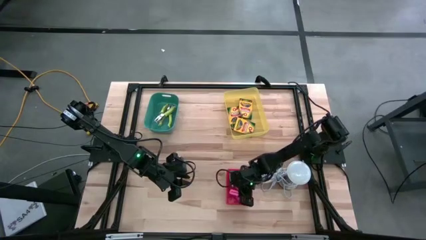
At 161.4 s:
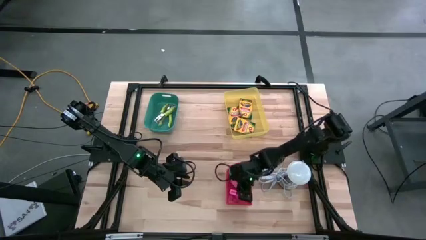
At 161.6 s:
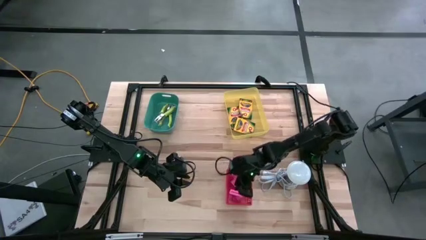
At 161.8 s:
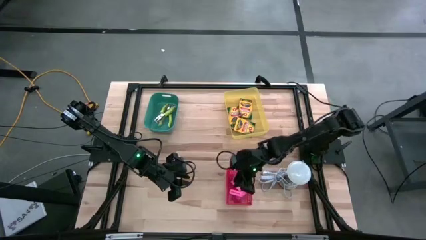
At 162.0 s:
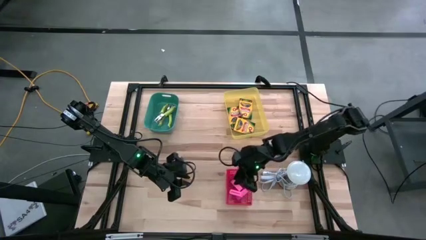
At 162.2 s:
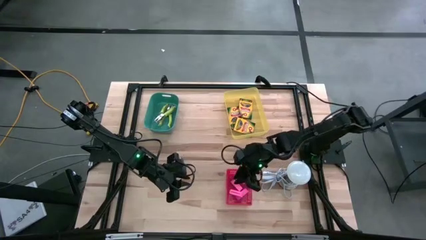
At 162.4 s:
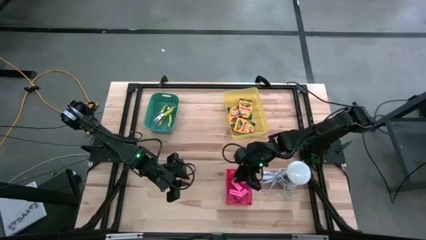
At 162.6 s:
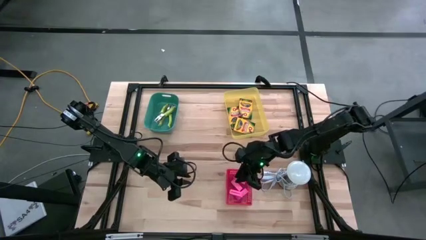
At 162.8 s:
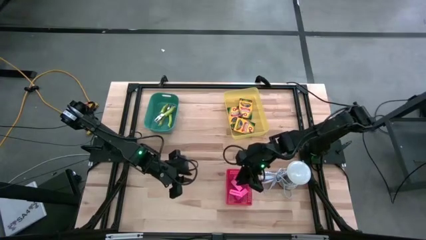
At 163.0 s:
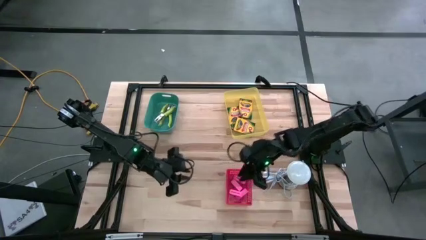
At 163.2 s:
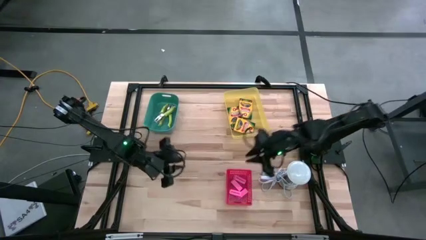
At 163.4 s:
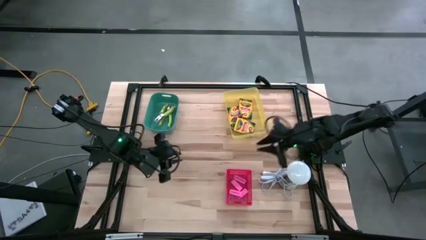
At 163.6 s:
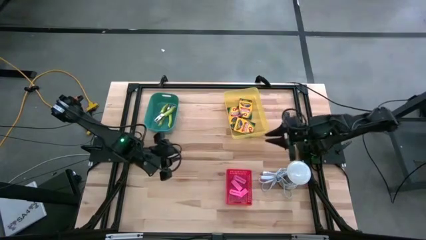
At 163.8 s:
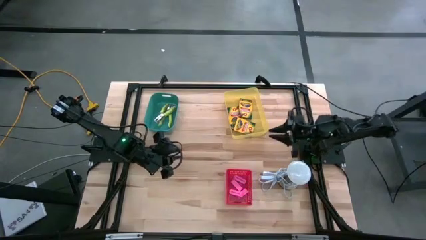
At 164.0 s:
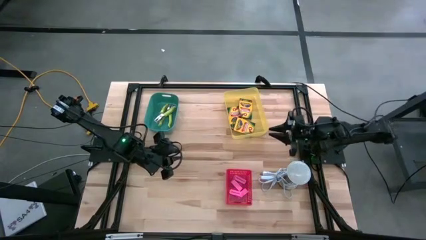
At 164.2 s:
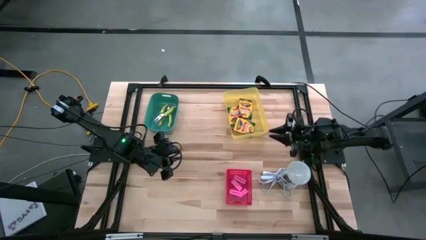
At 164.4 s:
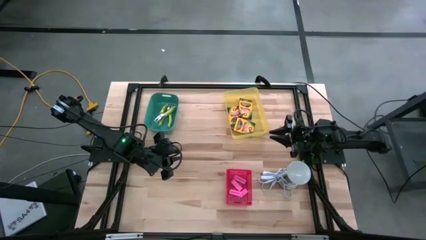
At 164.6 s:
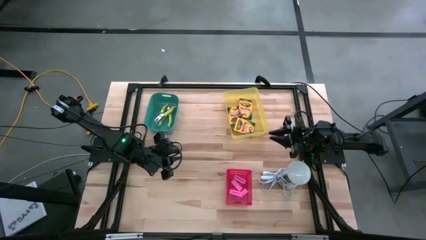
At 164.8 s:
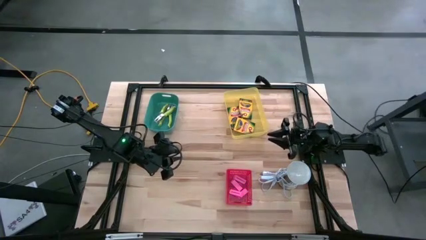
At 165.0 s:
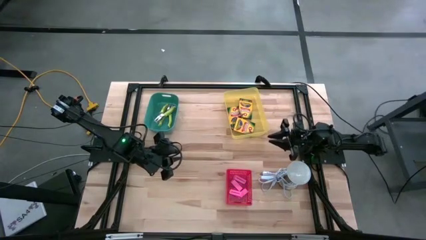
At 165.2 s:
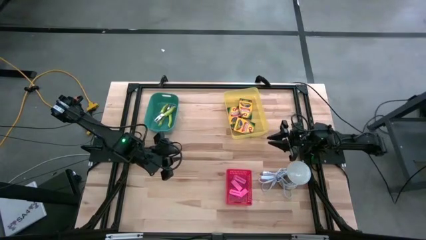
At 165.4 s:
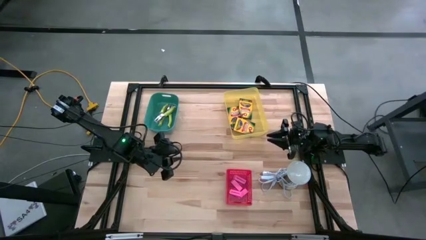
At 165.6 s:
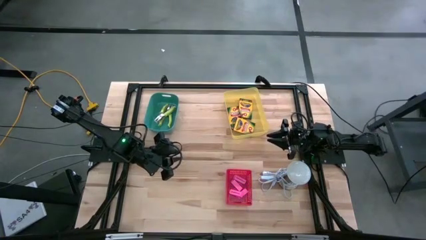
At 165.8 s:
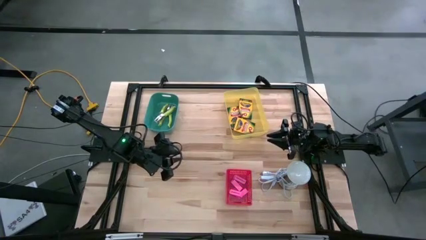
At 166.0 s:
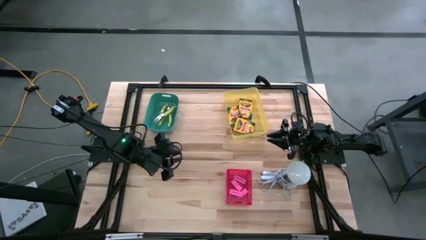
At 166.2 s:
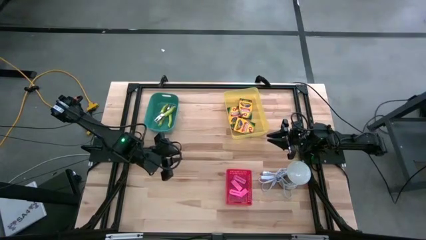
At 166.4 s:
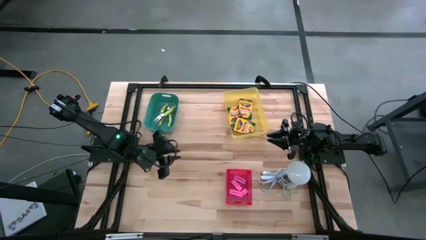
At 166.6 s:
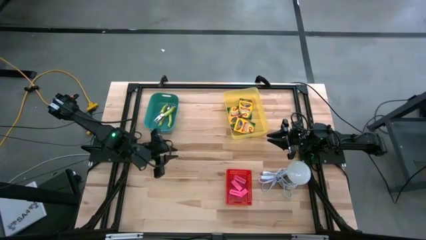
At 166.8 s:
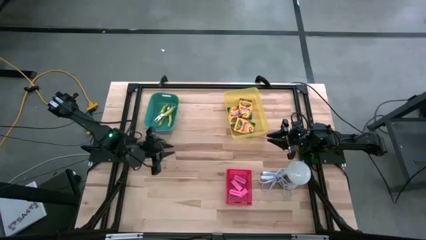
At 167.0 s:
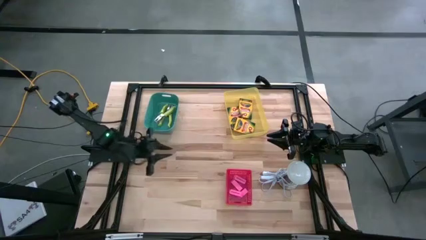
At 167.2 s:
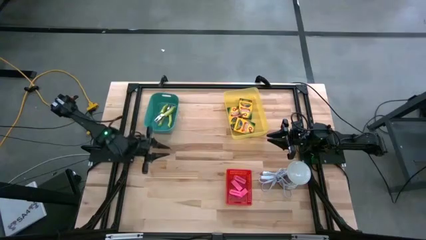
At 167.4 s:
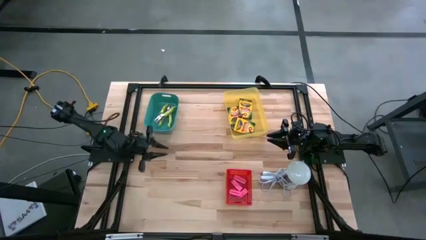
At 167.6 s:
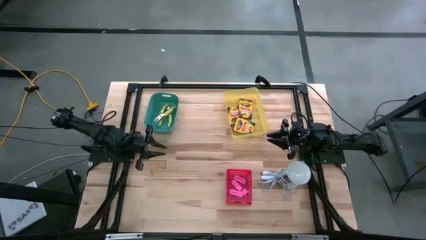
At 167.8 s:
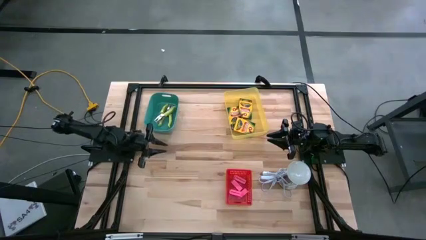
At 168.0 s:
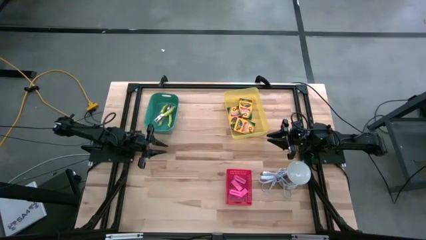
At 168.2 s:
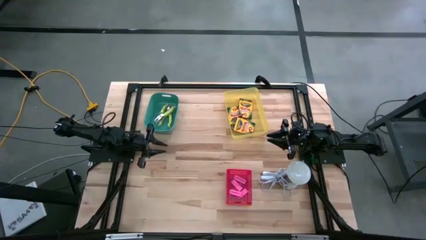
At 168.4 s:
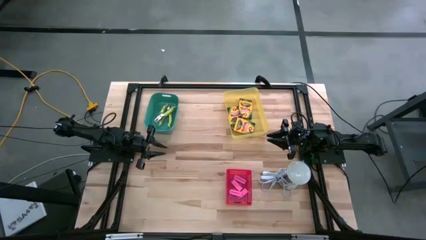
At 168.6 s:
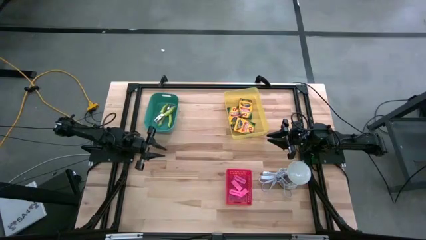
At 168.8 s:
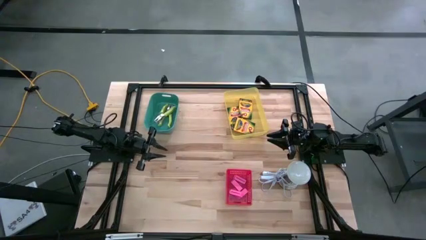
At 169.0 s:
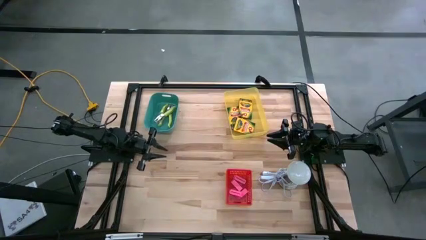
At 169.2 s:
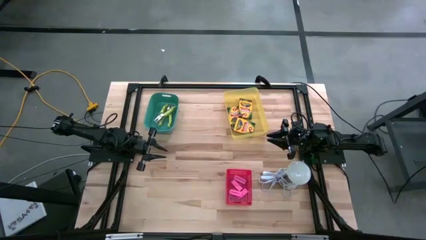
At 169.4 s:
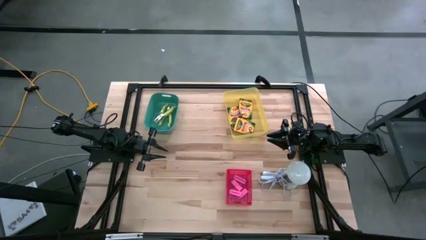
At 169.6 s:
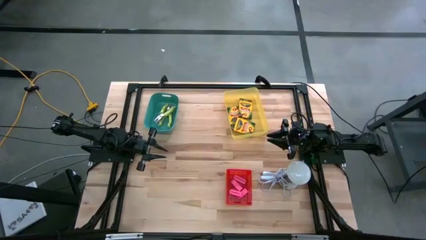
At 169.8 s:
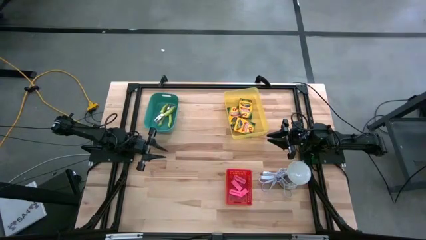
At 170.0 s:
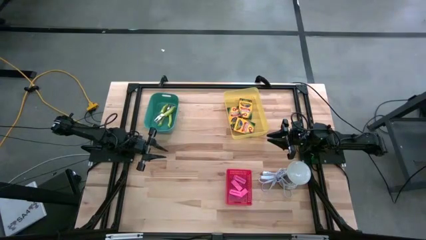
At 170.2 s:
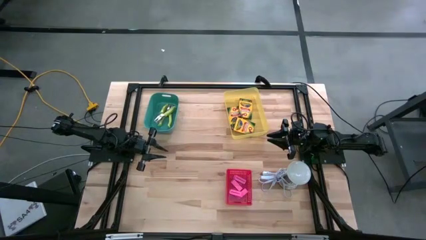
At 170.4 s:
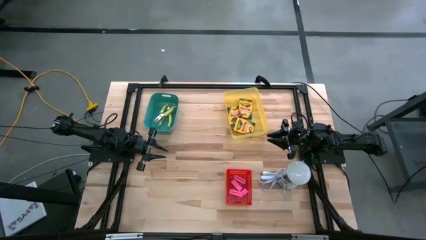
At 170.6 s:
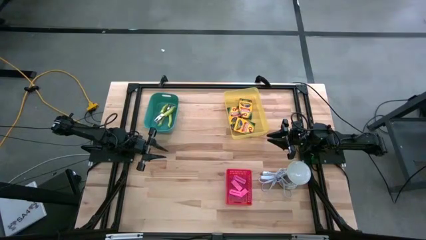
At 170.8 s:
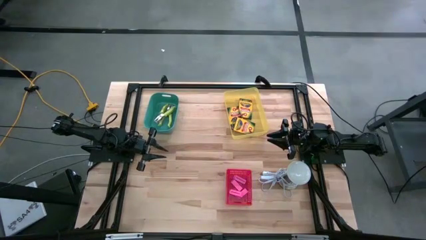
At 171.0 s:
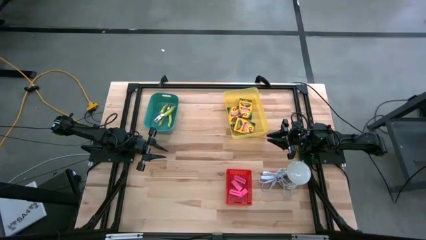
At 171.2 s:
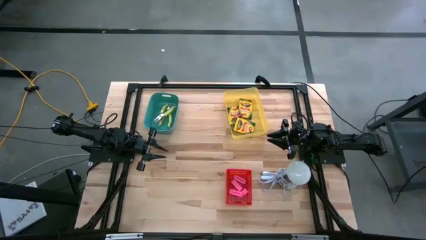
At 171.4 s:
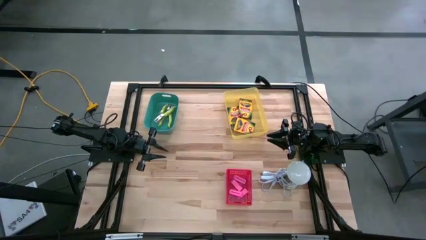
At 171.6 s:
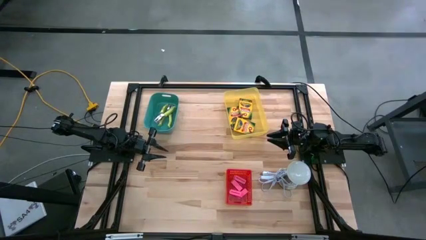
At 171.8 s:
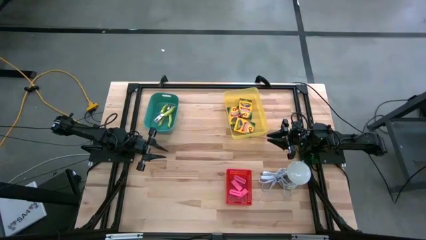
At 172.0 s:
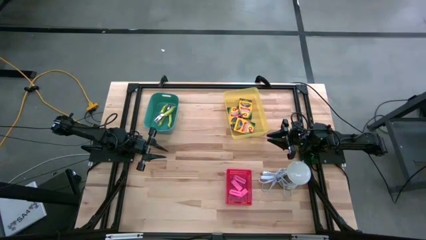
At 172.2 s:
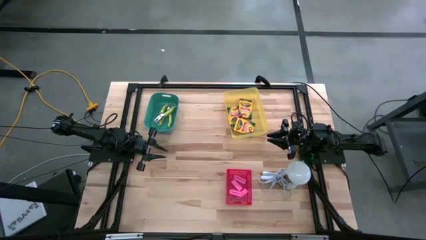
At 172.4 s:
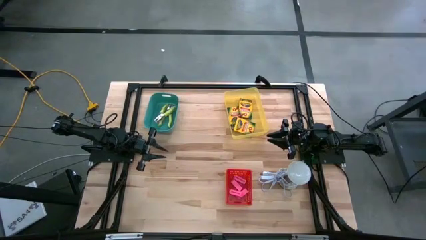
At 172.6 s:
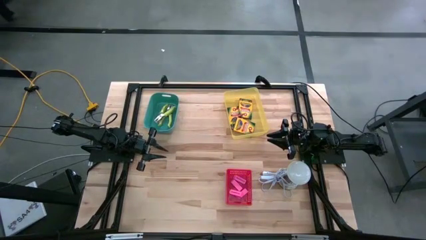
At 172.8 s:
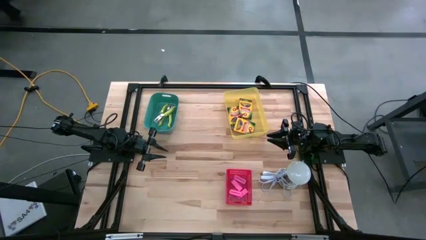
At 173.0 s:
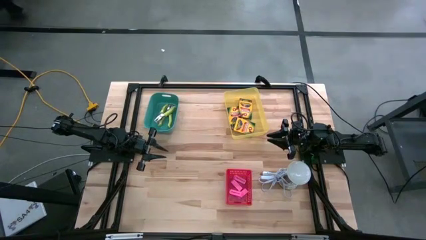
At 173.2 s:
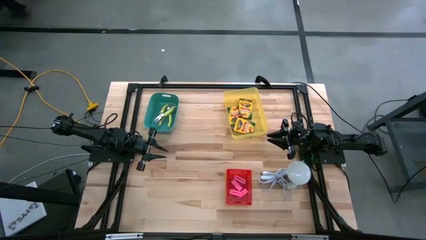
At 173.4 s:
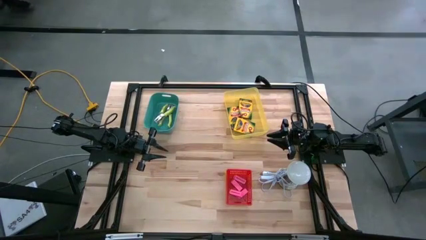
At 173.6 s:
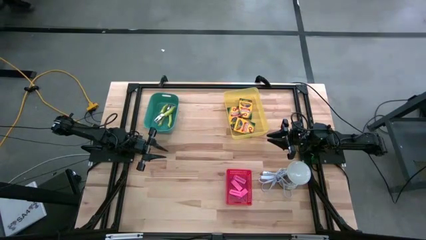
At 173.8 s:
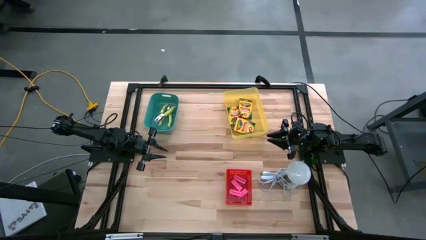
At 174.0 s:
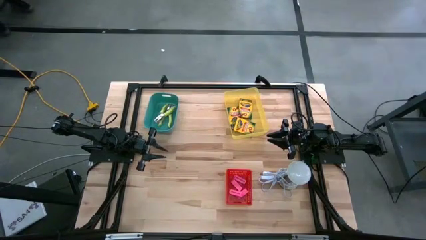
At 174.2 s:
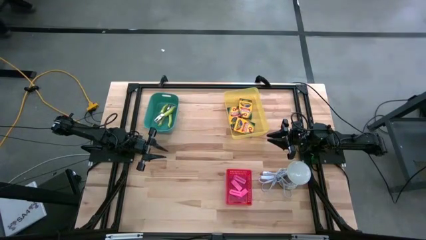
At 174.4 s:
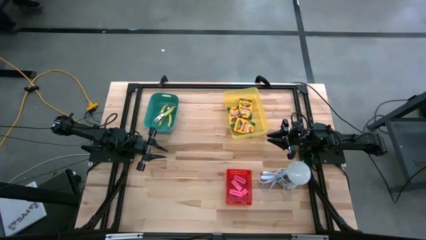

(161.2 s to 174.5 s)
Task: Pick & Place School Supplies
Return to Home Position
